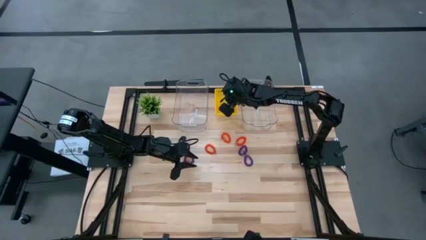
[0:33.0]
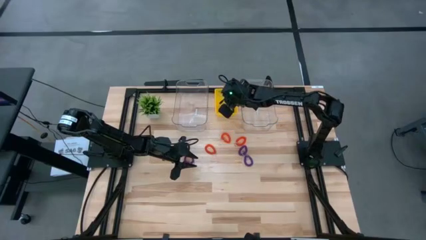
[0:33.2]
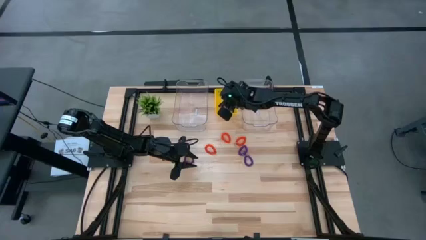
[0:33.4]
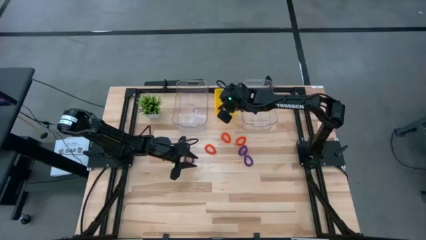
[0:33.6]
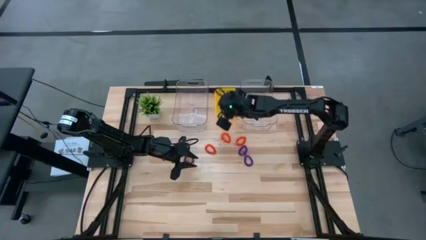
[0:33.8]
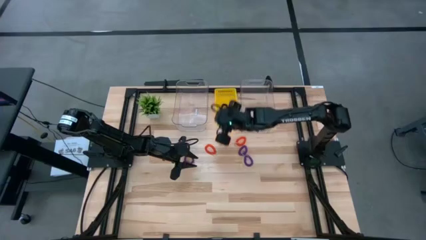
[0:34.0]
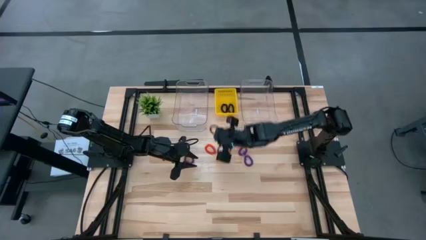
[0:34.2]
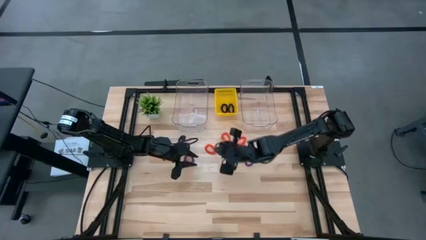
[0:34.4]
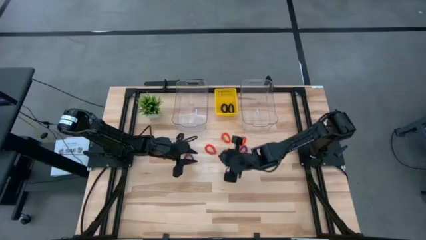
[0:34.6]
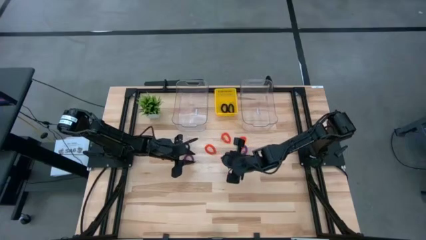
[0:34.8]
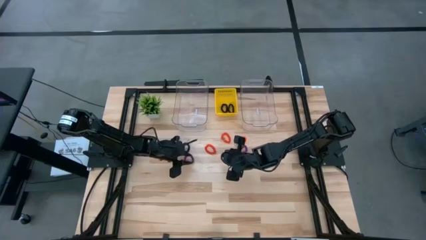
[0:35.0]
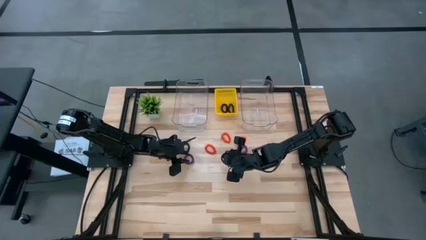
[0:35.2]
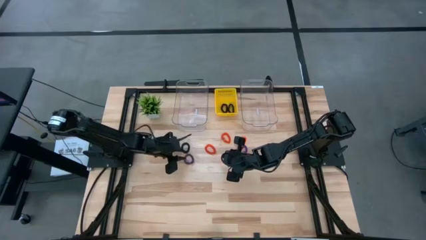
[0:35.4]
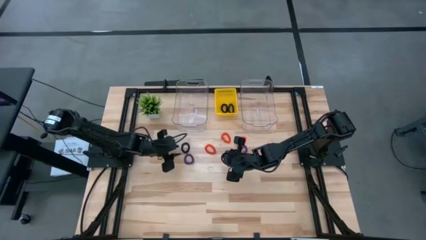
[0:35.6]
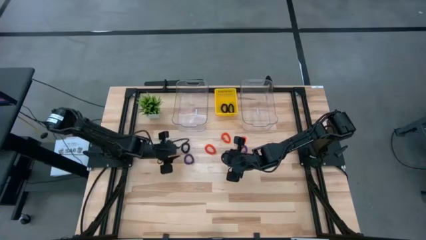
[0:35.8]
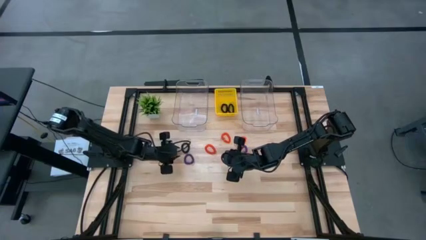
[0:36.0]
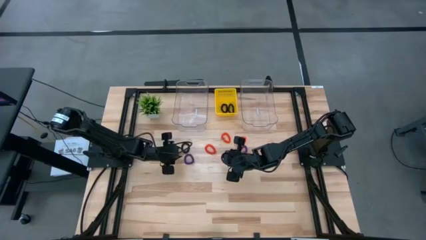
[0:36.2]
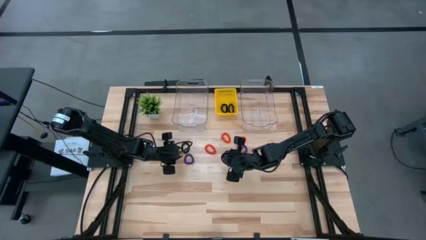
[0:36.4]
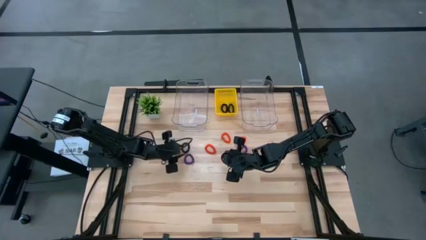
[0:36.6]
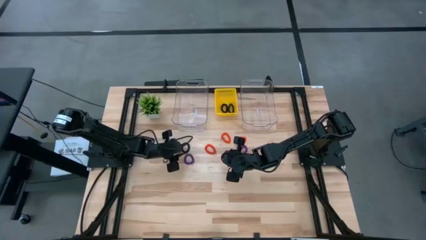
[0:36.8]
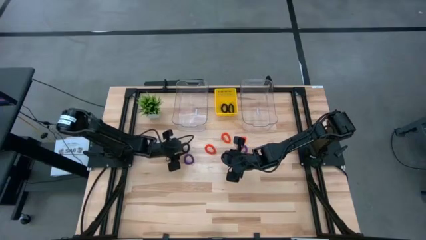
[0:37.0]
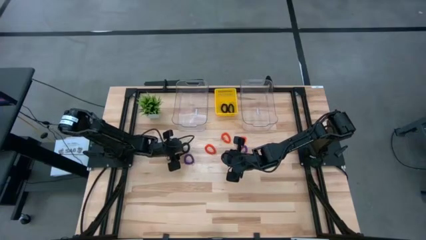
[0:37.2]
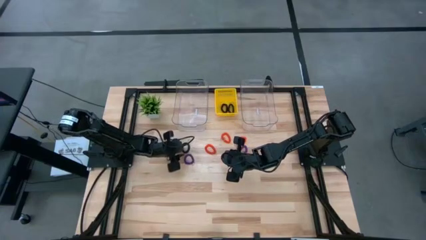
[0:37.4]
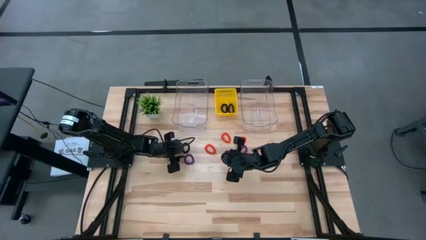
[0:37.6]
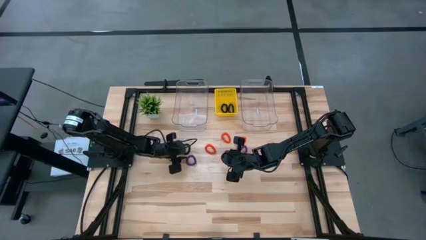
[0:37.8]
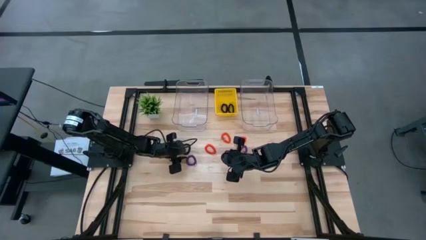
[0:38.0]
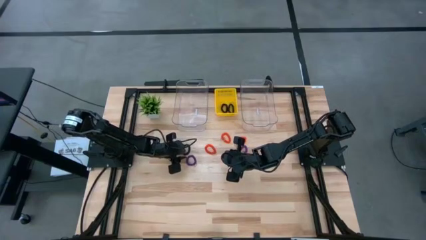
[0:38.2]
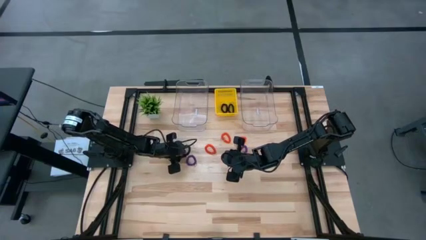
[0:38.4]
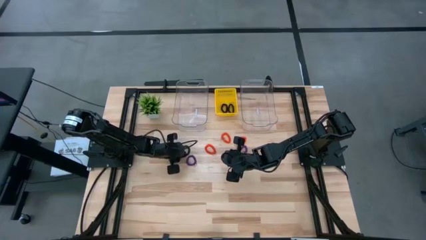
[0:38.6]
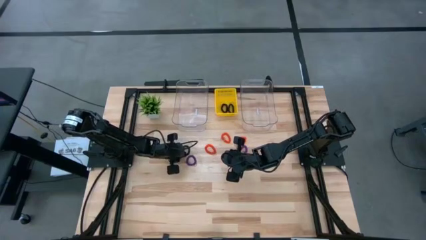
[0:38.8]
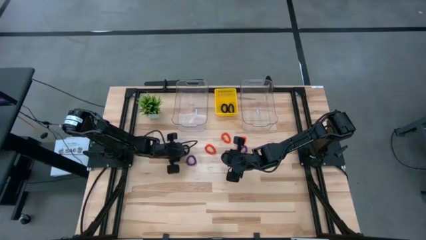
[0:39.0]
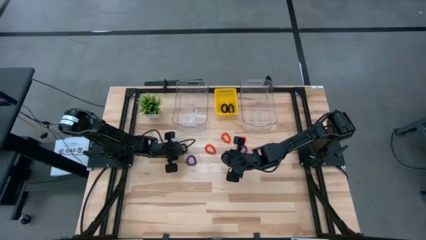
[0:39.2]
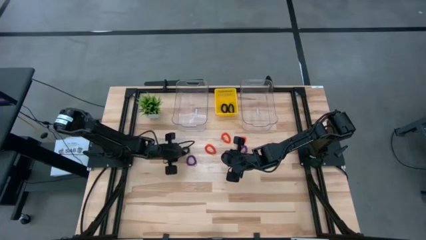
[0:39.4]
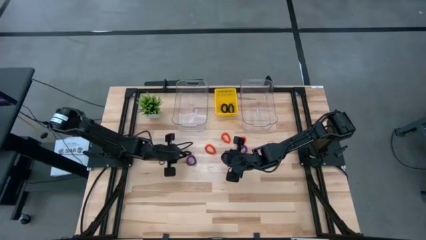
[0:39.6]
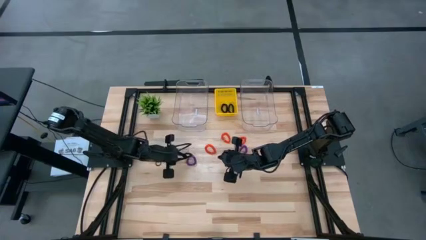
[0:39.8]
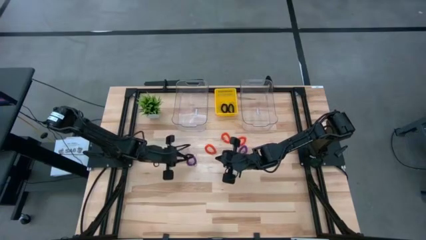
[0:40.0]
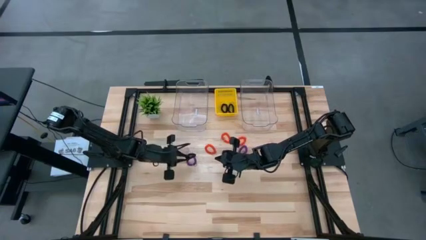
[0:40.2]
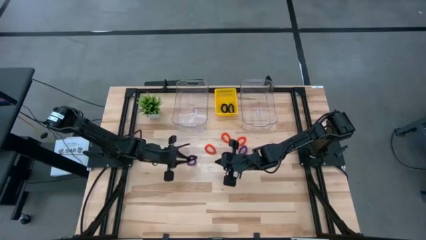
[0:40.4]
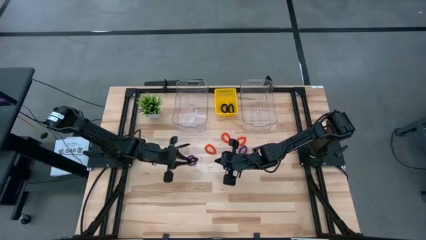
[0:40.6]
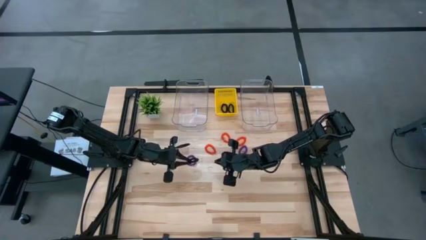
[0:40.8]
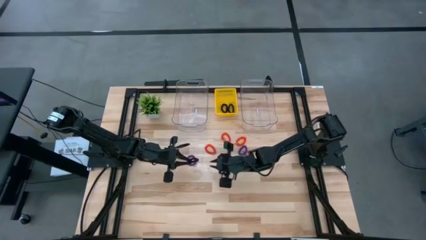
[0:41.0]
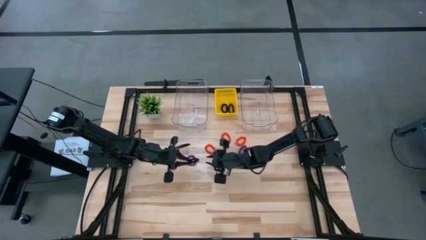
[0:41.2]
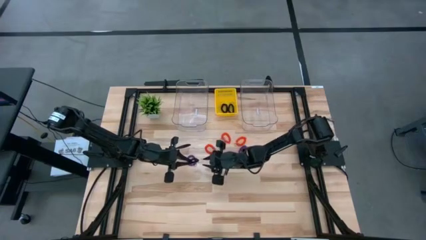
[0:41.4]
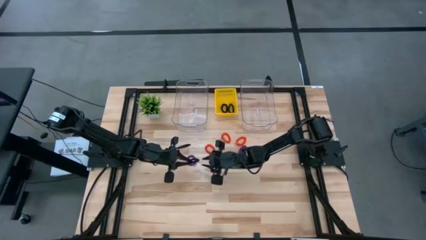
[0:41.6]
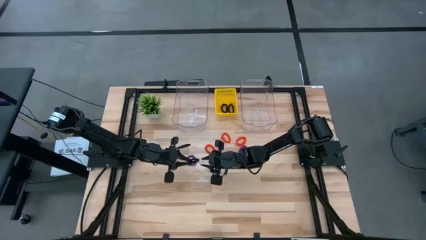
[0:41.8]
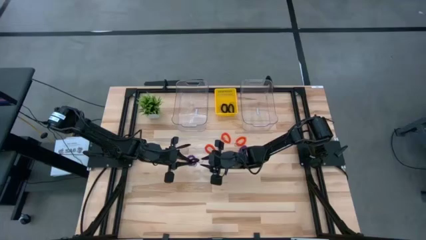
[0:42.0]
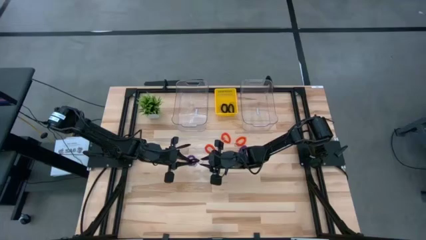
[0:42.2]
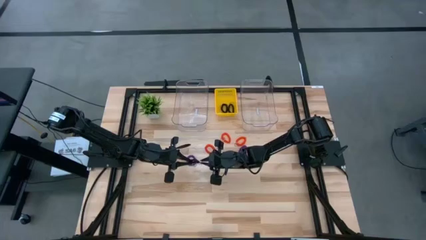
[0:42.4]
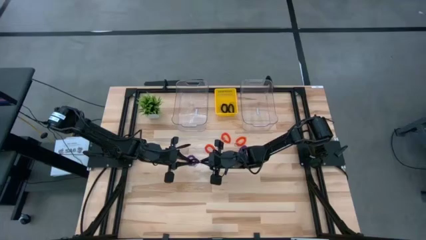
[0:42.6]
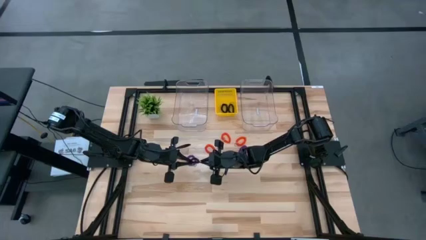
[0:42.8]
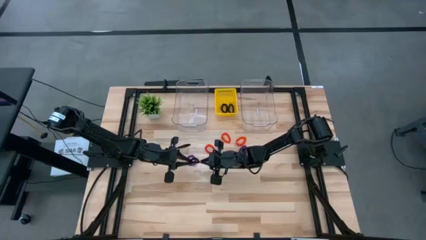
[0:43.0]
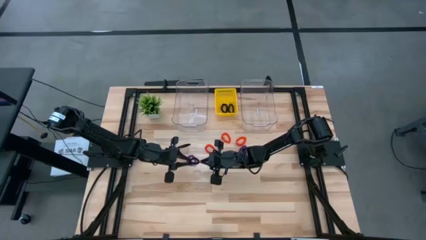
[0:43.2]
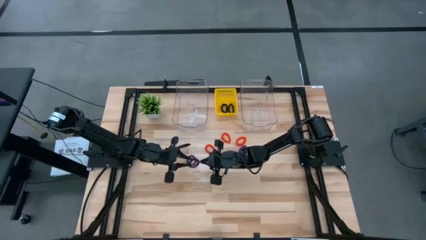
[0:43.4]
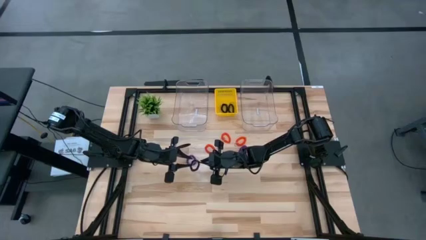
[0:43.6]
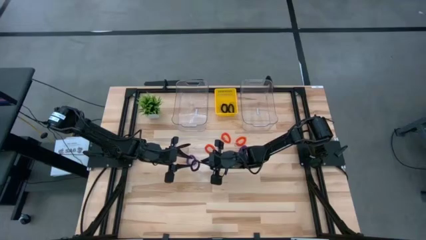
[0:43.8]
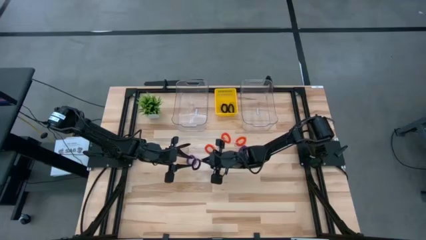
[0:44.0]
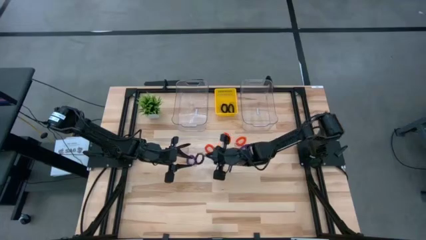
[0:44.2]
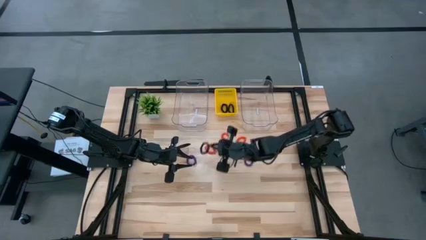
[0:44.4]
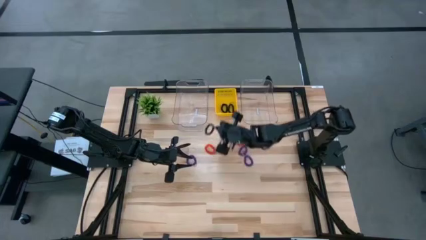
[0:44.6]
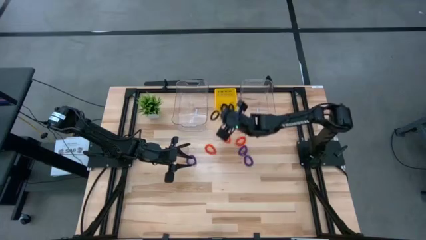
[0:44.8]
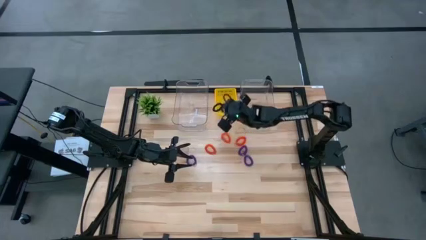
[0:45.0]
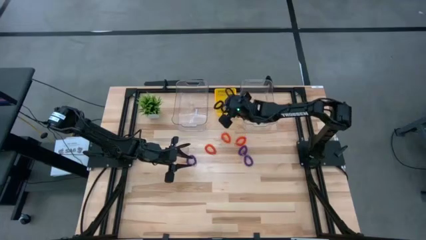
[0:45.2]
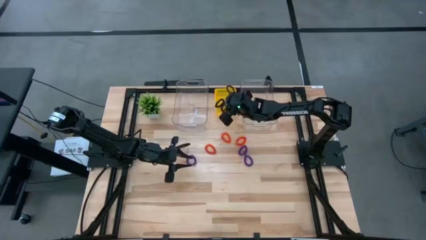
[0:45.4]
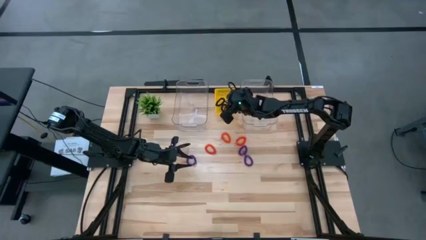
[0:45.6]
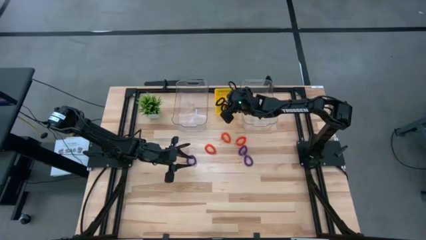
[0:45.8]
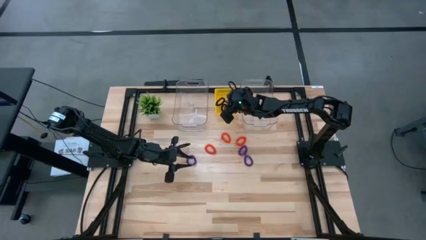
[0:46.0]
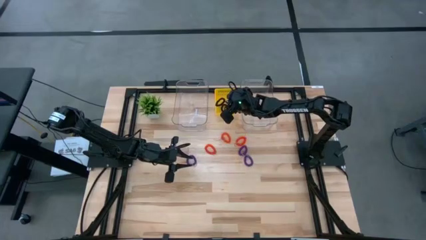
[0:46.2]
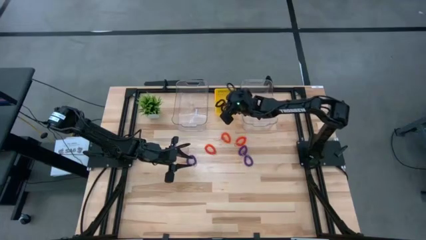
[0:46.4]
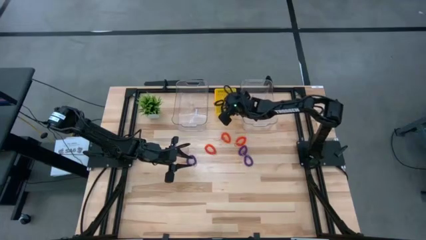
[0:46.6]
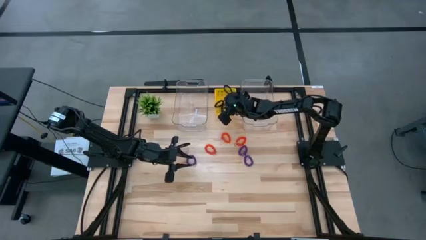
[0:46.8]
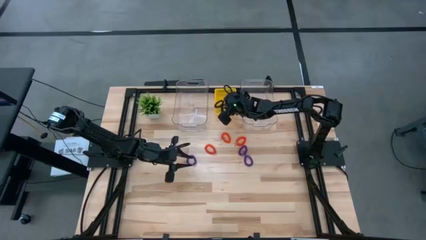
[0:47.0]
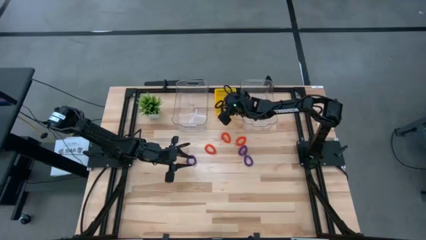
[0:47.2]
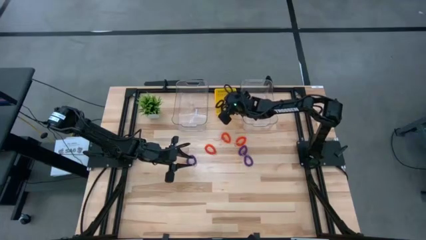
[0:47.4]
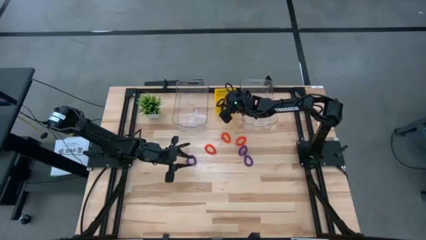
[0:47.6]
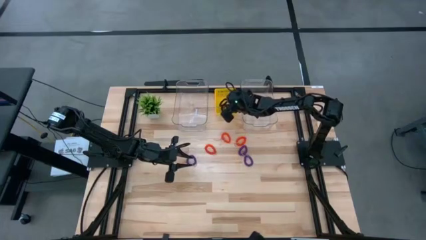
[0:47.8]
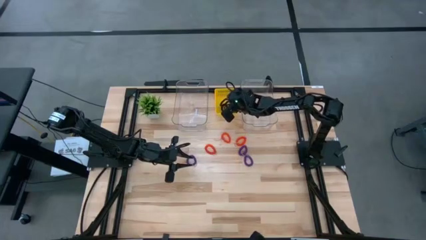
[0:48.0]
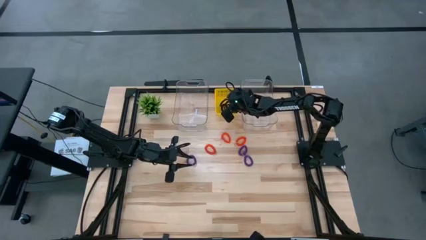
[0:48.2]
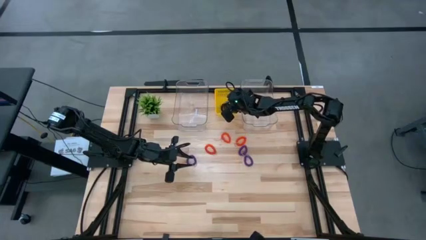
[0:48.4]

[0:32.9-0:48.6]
Task: Sort spring keychains
Put the black spring keychain into the yellow bin

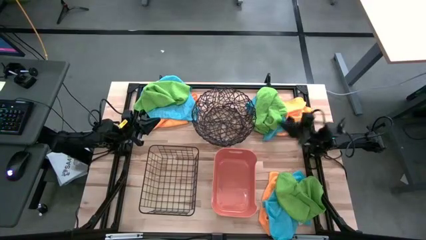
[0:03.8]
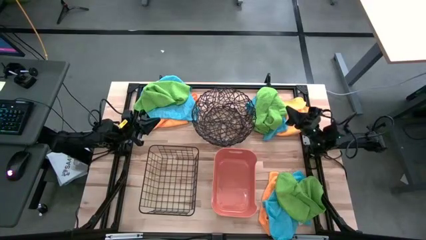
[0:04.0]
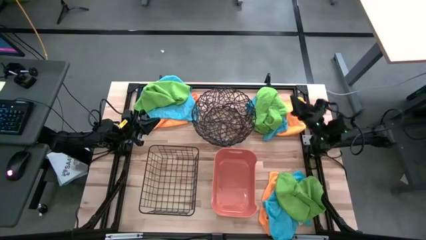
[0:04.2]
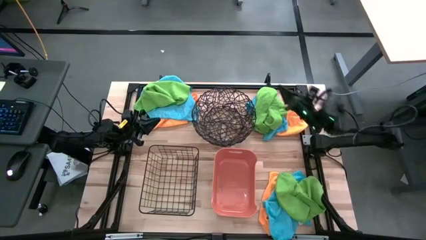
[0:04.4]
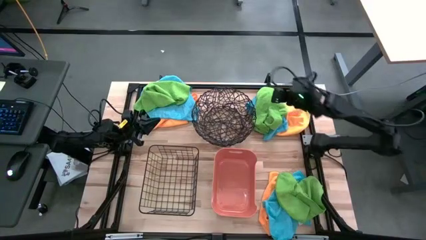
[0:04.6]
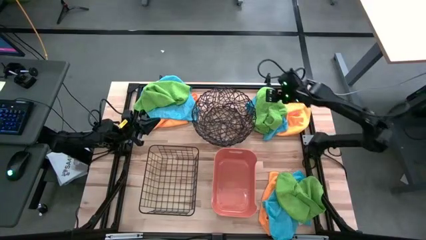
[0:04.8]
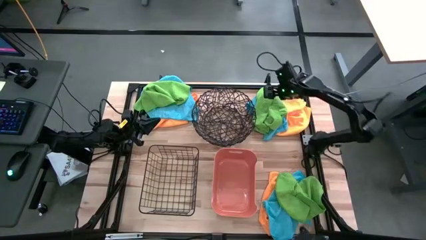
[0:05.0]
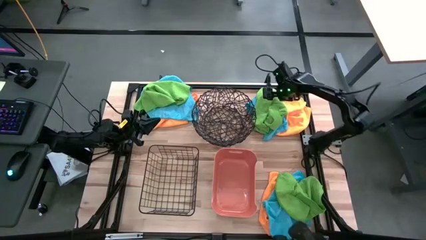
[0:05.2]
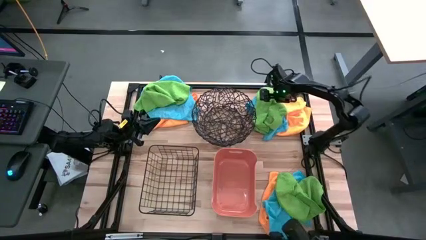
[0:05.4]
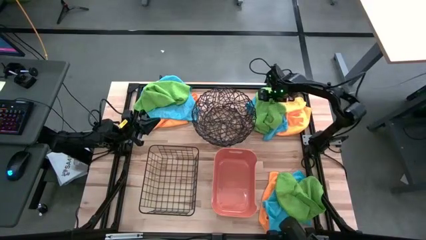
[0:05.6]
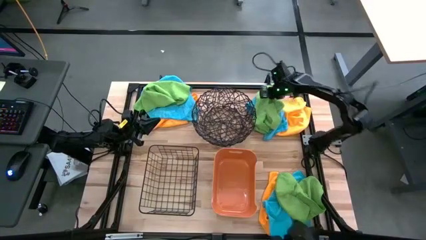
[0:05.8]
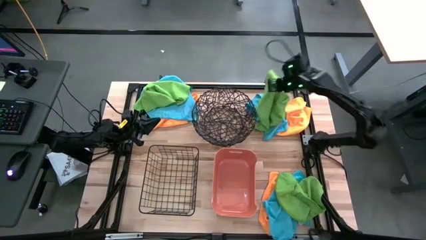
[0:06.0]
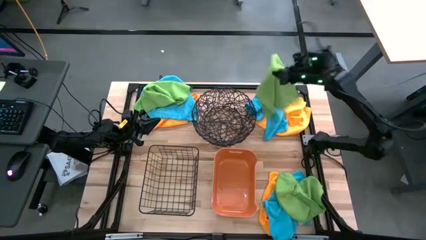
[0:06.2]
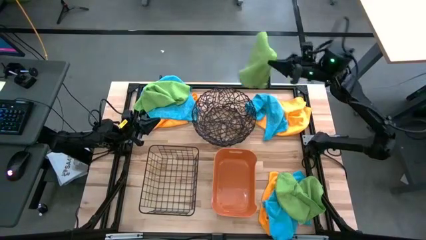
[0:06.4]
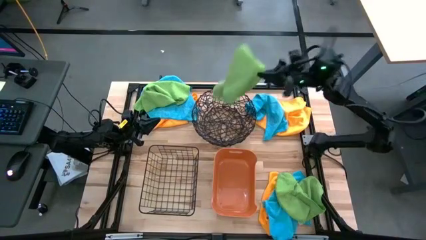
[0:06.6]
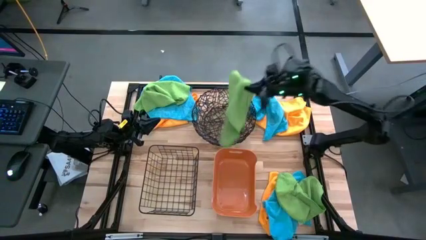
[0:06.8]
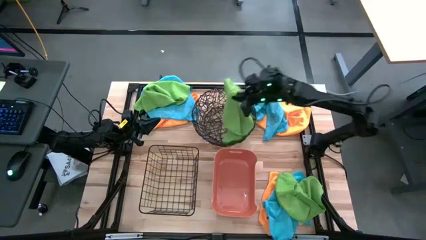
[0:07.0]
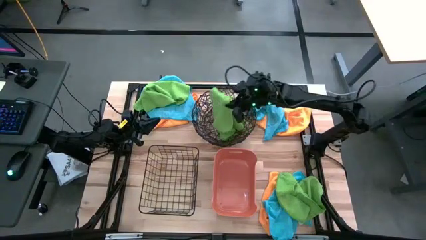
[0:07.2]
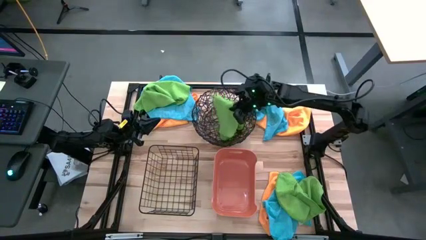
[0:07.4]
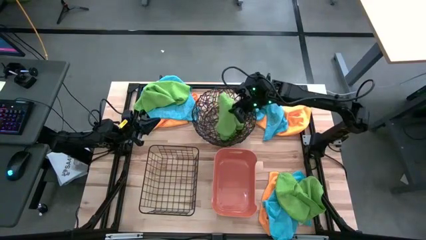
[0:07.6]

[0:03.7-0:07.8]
Task: Sort microfiber towel by color & place in baskets
Put the top right green microfiber towel into the black woven basket
